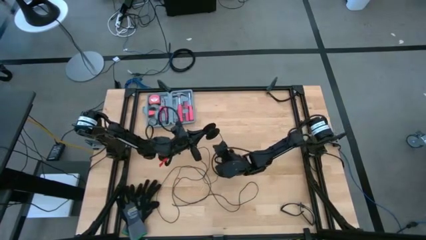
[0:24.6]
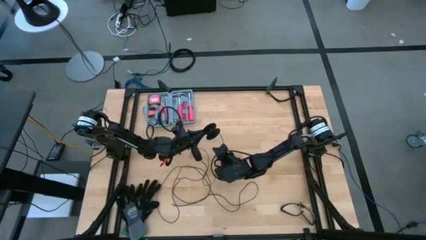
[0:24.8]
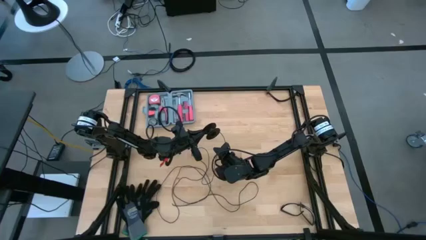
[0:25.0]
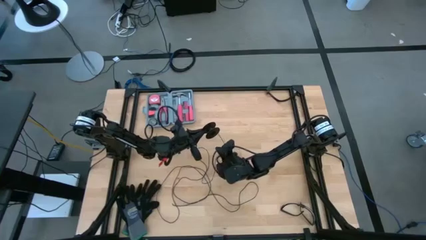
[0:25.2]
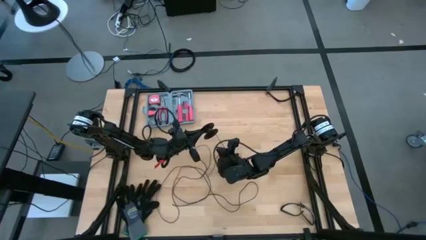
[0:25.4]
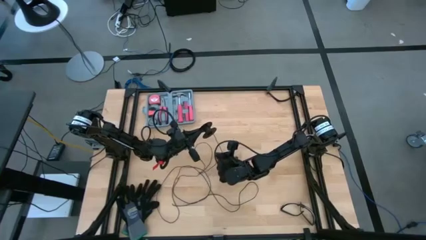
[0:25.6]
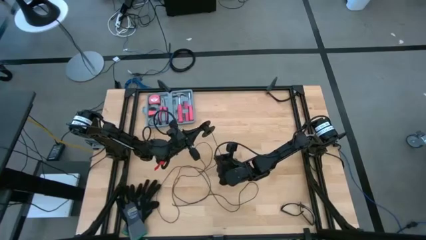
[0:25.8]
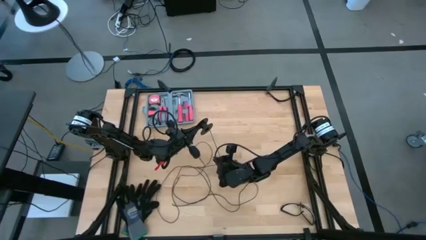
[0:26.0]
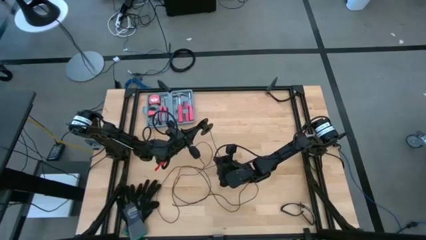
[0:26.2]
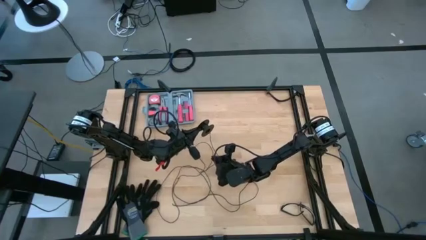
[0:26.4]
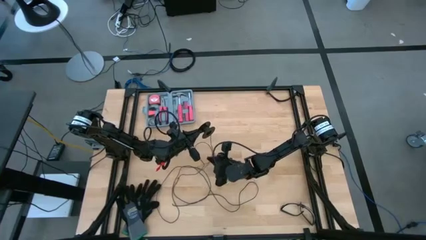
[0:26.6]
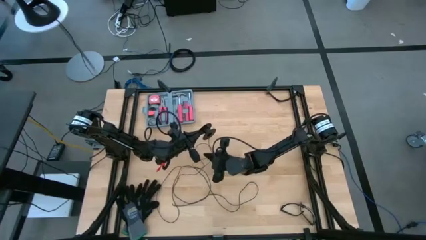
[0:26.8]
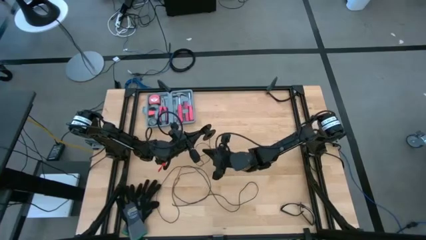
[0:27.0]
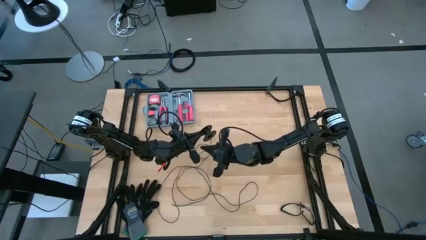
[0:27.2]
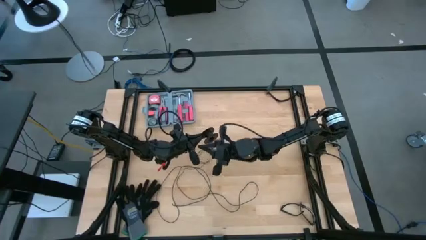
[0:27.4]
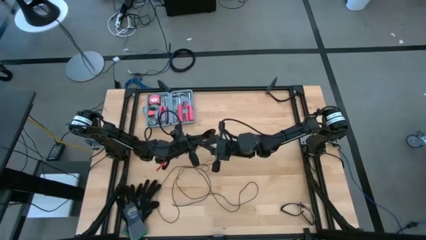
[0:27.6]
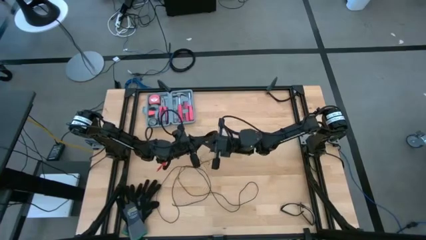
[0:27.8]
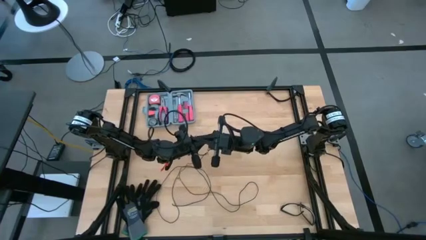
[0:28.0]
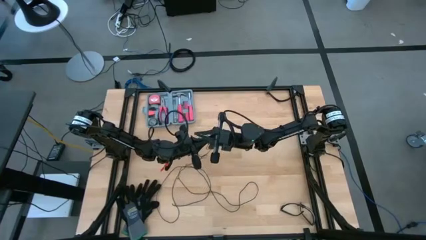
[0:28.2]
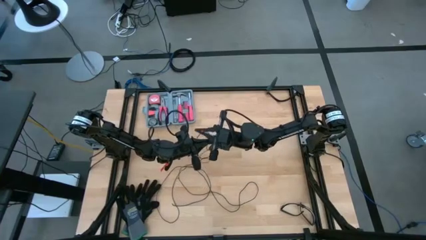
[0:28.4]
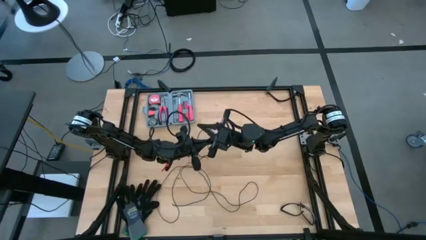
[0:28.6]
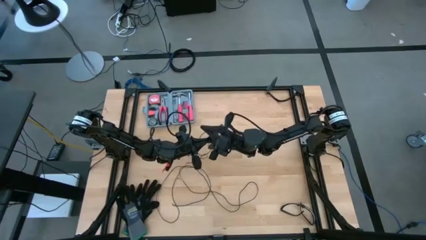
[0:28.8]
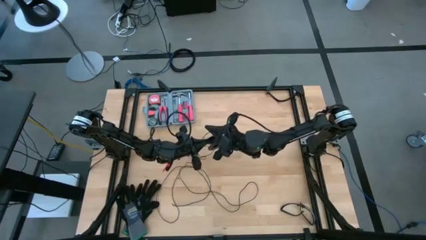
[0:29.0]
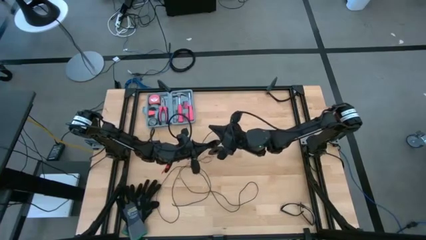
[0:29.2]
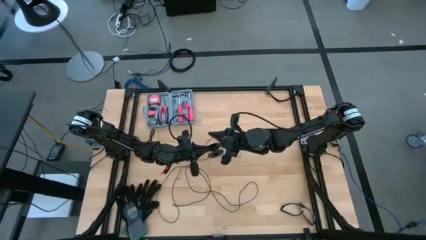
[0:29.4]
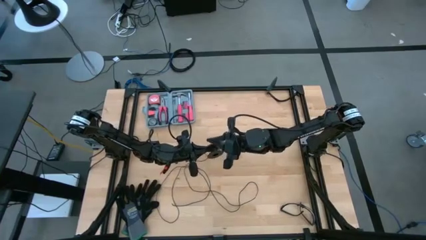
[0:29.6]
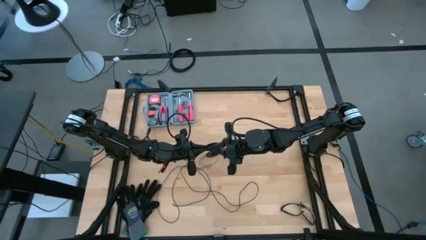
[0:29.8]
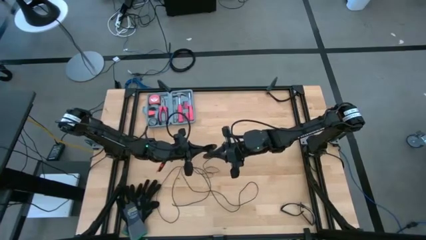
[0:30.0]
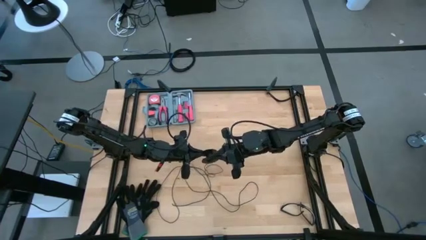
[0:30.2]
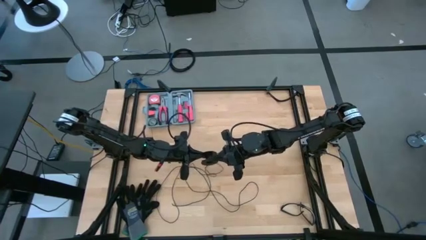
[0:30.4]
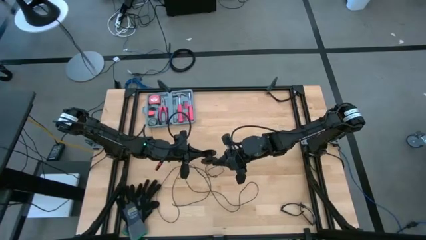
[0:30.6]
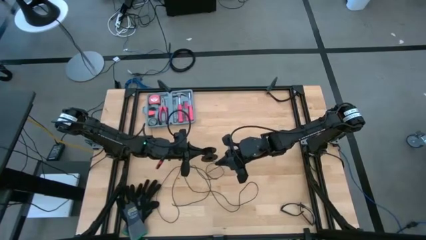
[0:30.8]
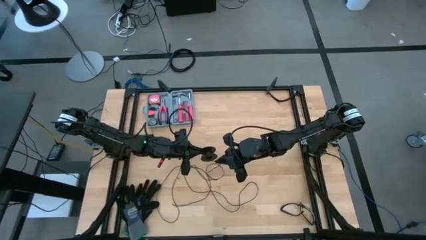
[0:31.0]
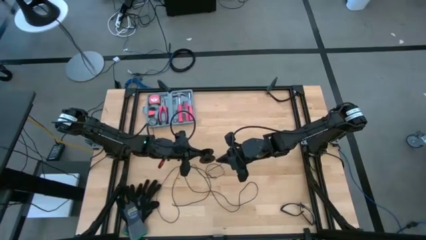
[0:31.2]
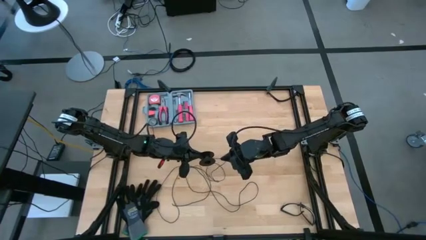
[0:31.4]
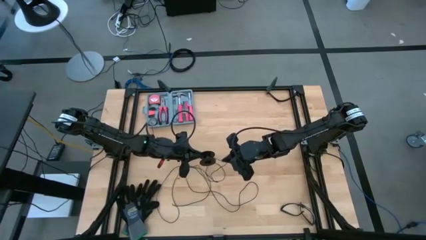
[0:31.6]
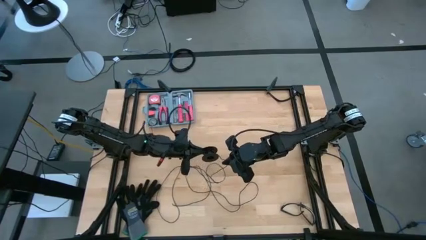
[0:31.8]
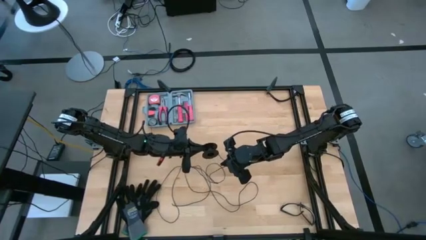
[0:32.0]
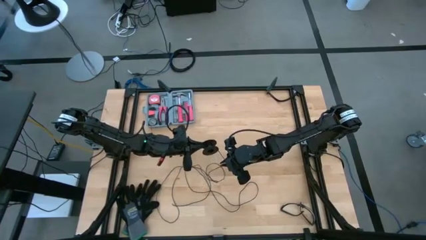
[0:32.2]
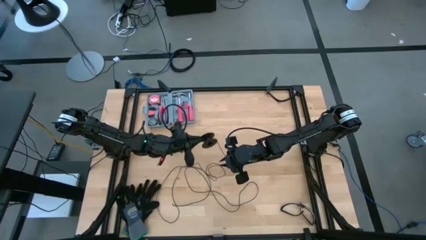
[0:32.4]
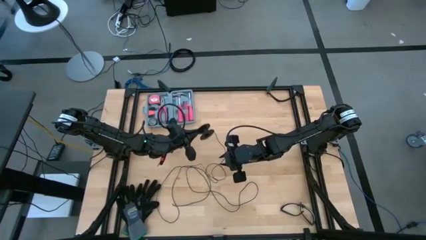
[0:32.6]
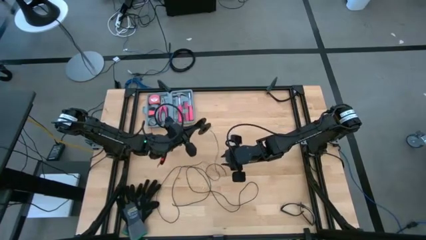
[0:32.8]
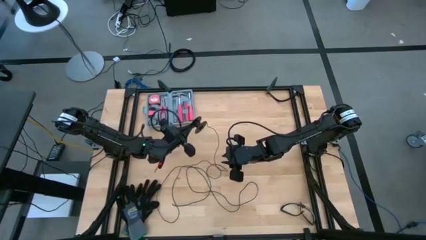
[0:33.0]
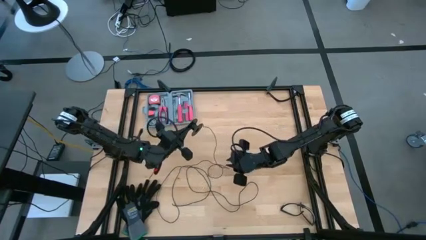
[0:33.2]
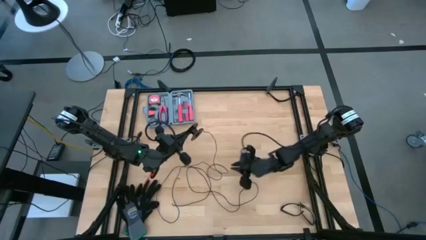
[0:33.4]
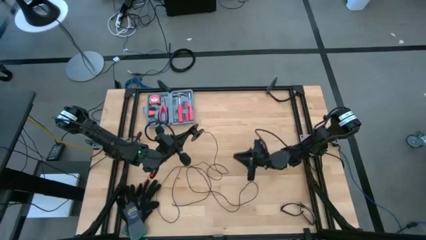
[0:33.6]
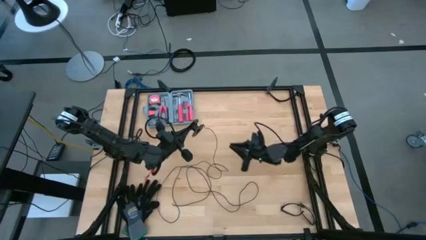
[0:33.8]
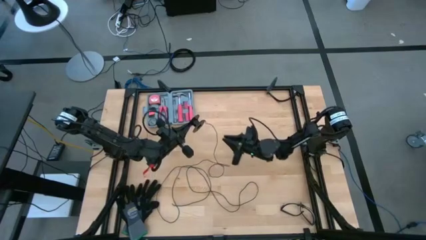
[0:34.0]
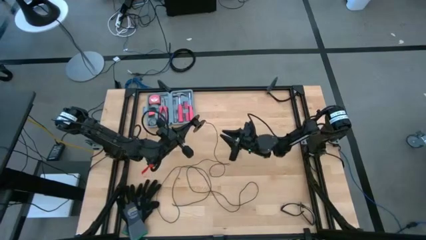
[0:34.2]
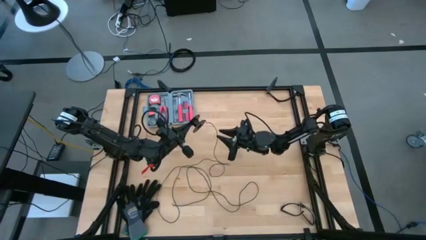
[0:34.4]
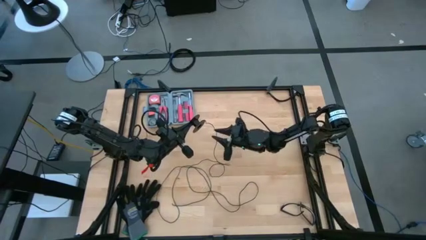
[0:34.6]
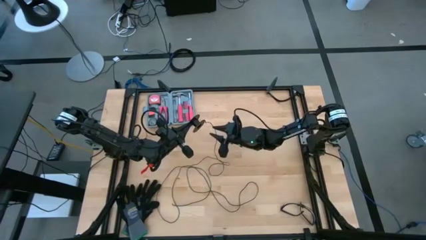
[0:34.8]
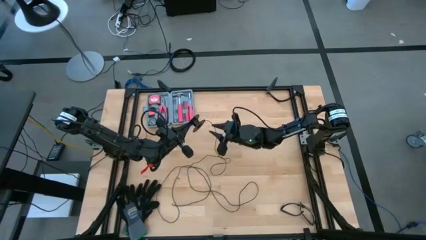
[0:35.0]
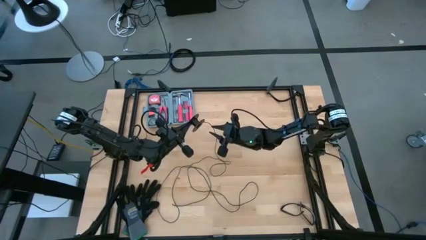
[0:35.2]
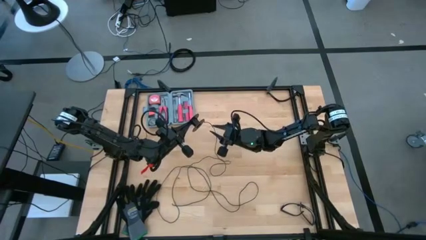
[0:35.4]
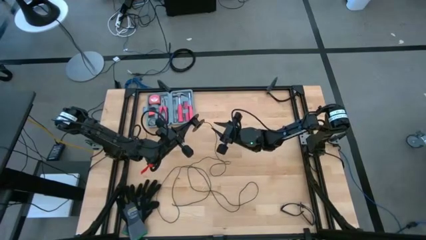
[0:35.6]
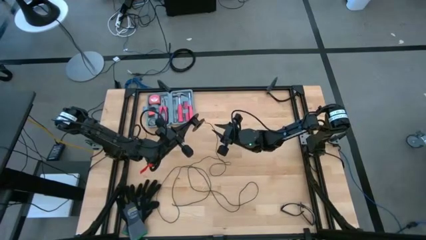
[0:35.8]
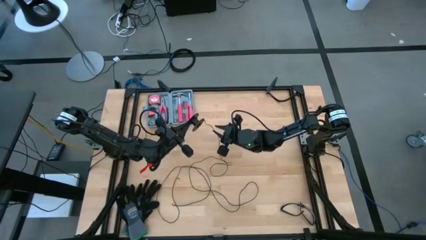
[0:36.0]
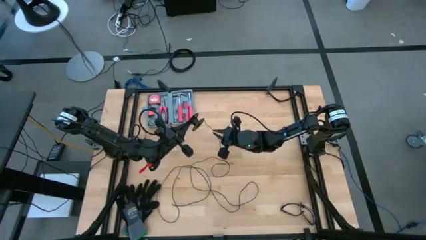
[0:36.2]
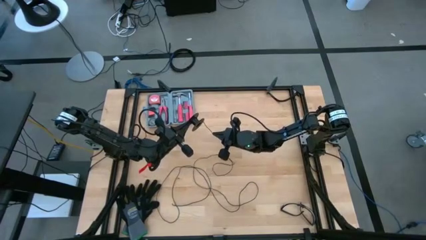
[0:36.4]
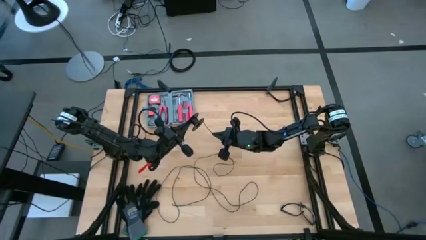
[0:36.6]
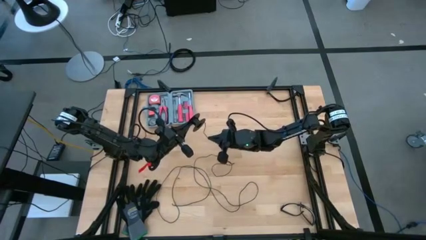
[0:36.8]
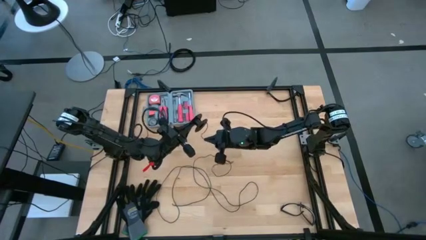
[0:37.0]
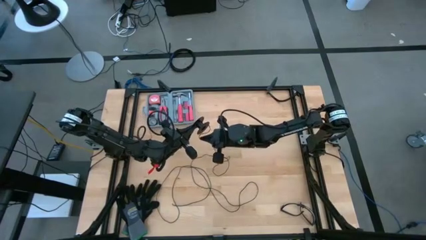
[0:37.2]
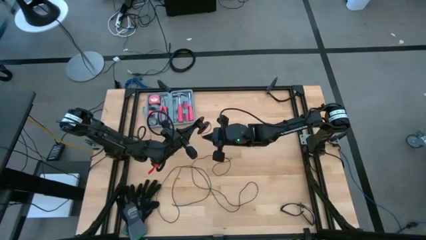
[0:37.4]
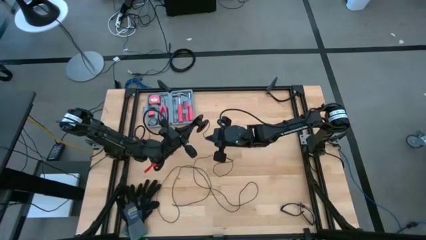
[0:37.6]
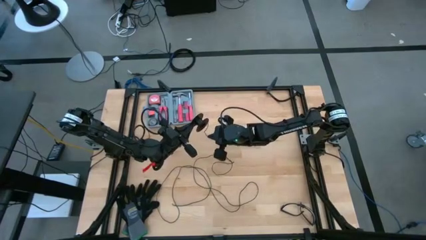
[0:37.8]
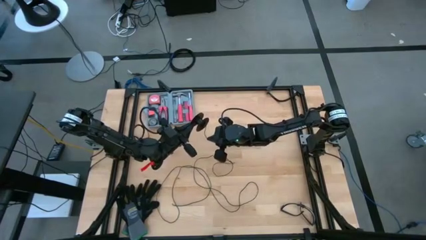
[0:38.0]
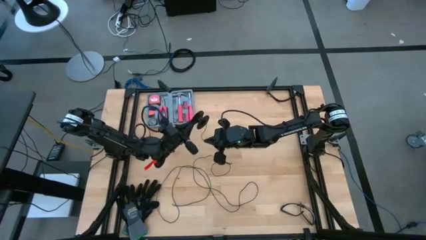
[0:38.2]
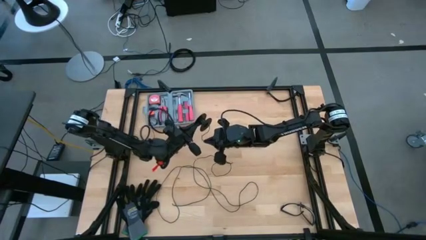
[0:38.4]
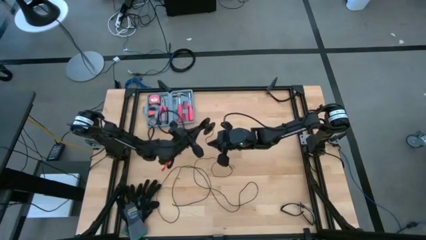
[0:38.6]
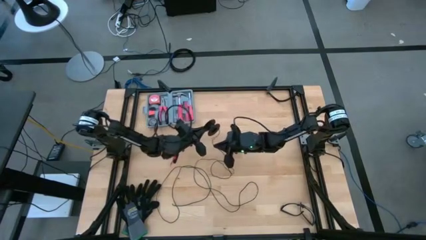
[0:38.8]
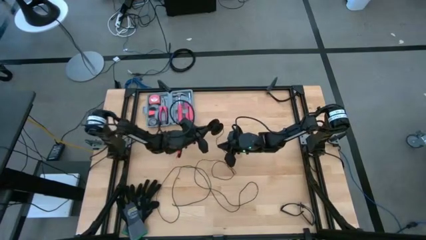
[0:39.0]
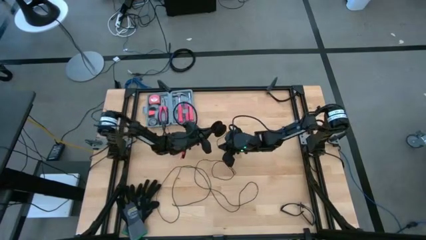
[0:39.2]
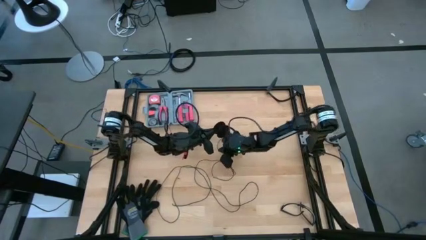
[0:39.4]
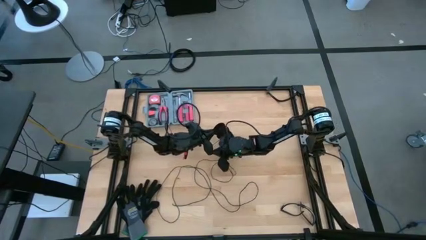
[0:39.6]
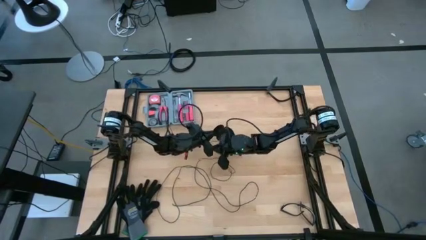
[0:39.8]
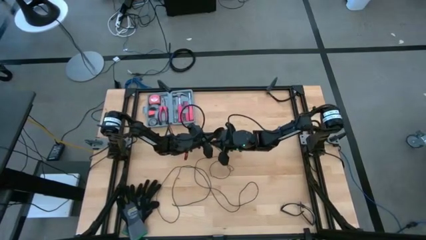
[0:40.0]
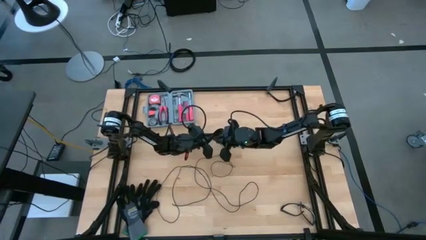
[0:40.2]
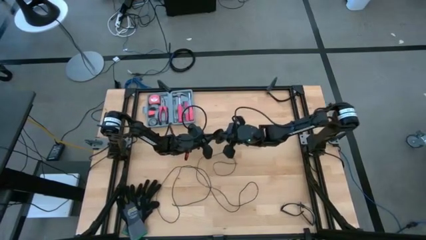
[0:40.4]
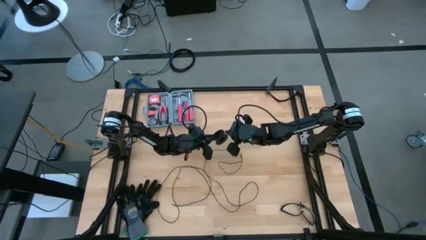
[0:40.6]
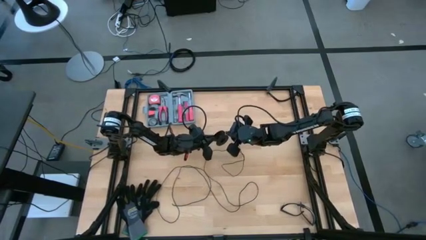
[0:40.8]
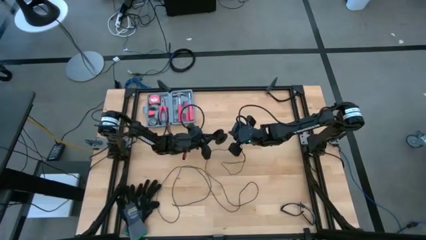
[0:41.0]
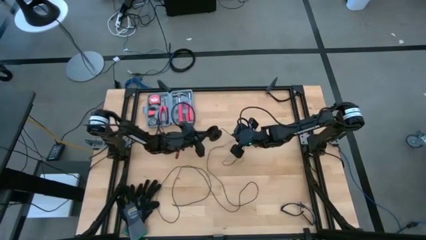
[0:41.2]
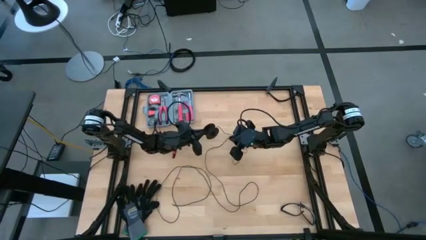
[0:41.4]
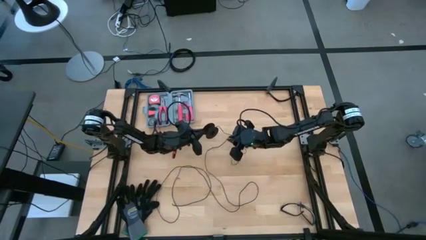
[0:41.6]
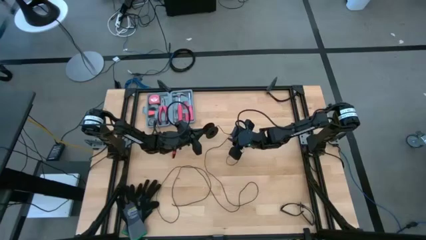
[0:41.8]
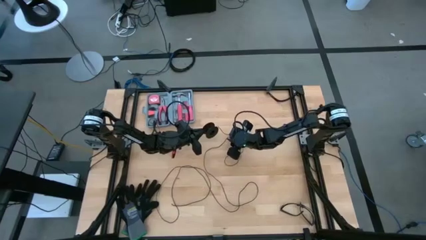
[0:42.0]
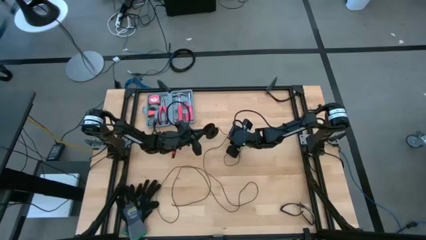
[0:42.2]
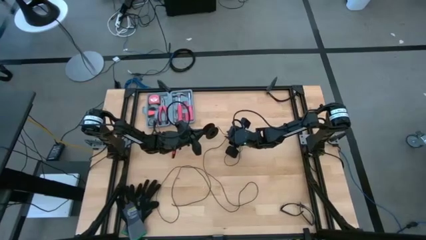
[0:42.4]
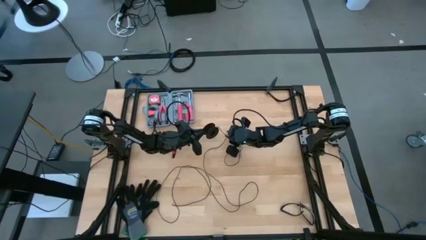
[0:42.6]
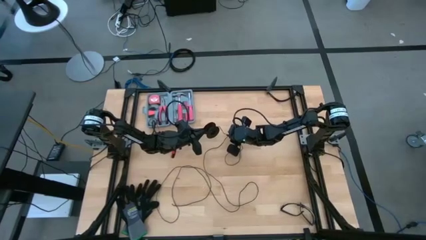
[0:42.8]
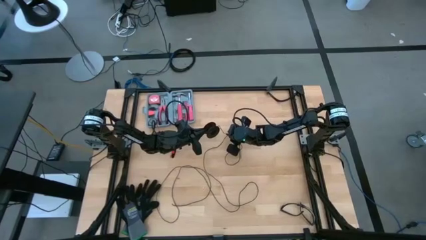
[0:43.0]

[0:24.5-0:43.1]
Task: Coil cords
Coil the black wire onto the spool
